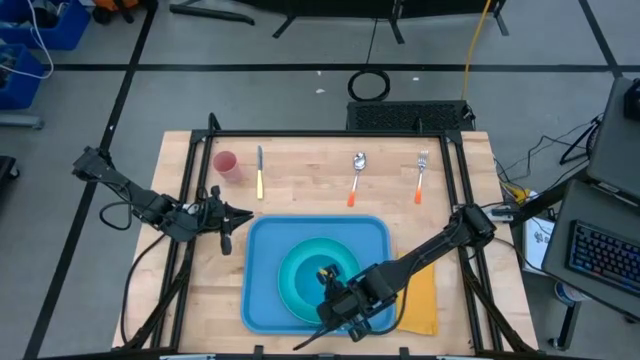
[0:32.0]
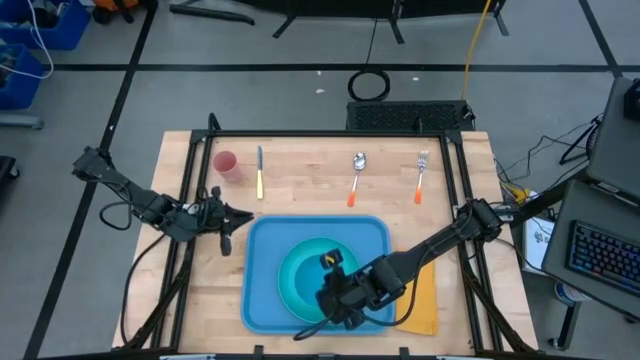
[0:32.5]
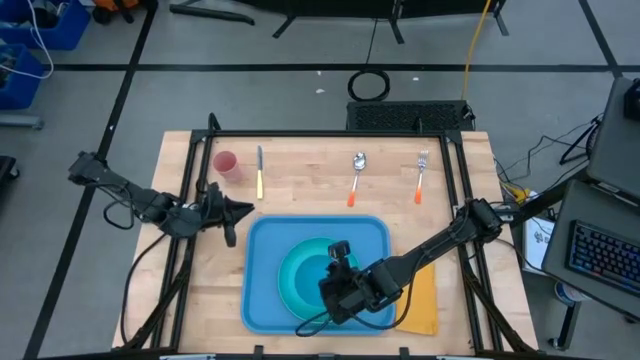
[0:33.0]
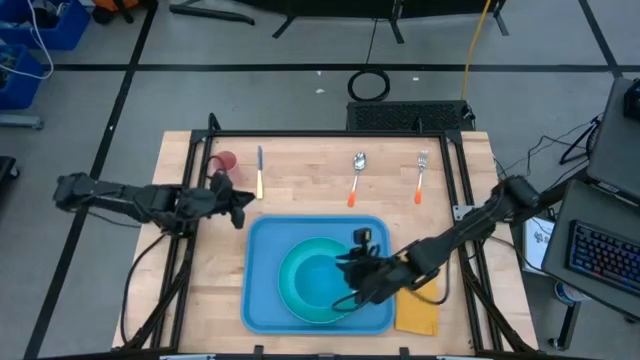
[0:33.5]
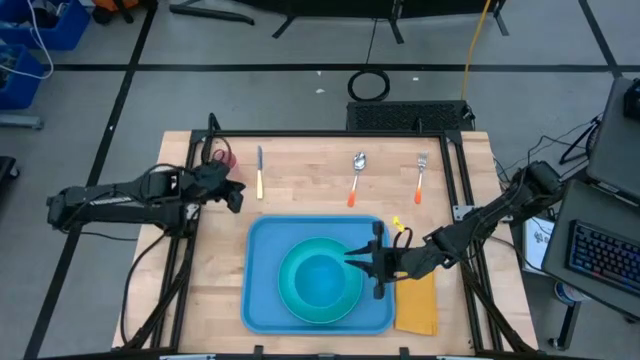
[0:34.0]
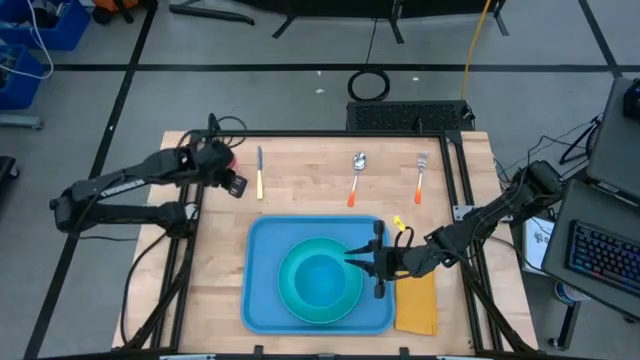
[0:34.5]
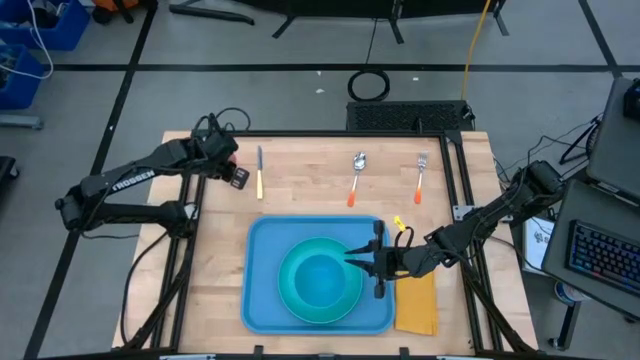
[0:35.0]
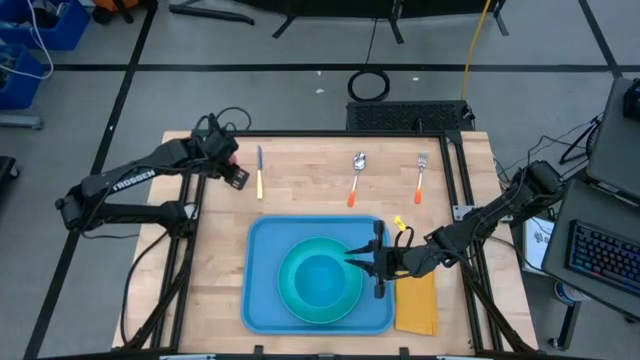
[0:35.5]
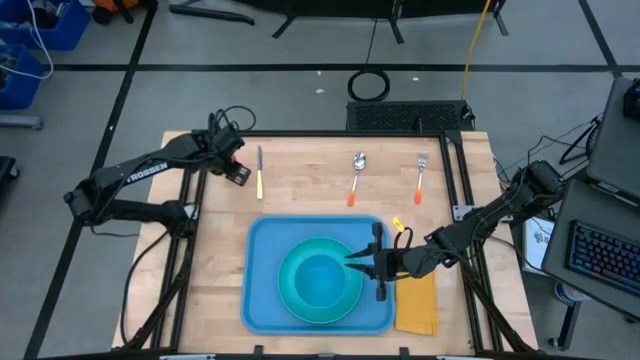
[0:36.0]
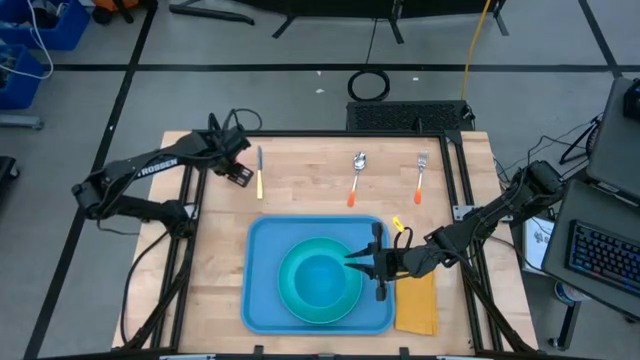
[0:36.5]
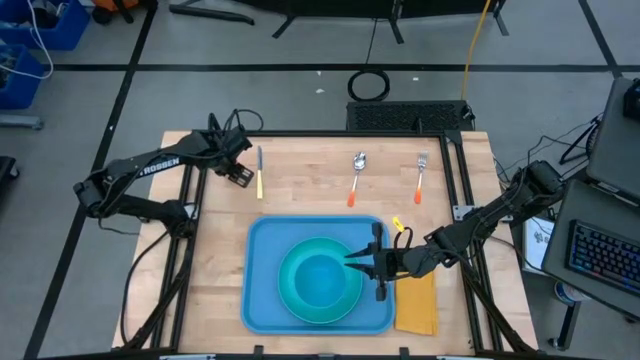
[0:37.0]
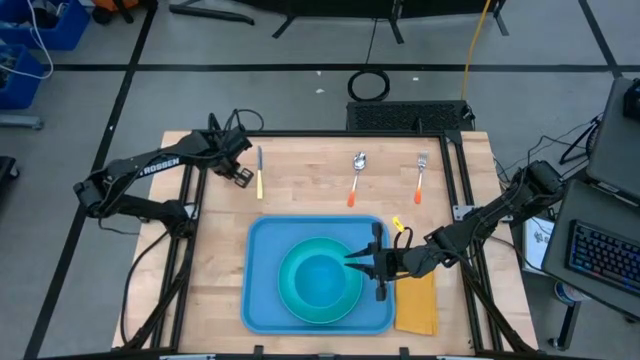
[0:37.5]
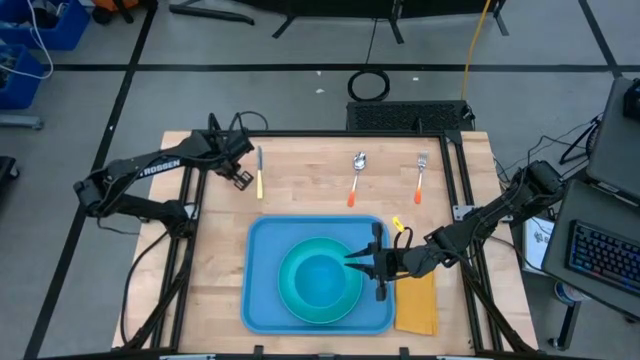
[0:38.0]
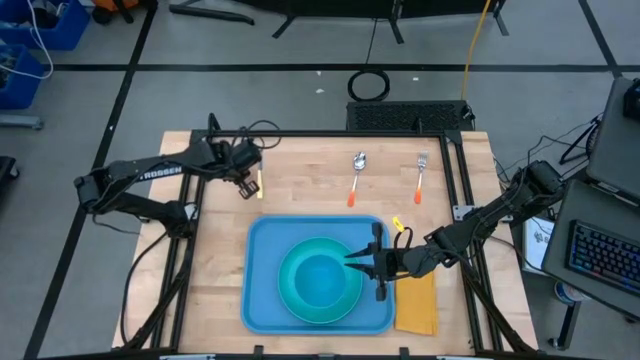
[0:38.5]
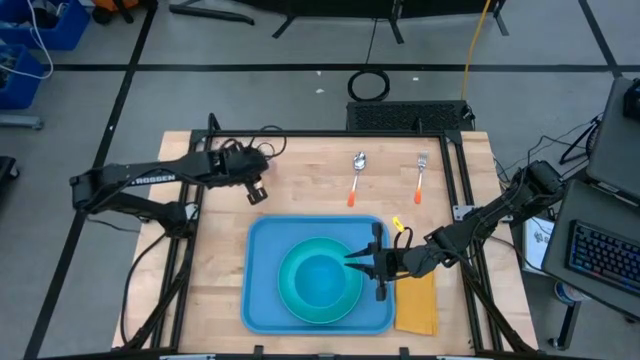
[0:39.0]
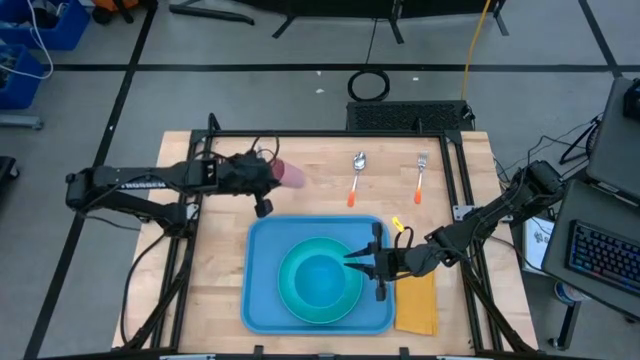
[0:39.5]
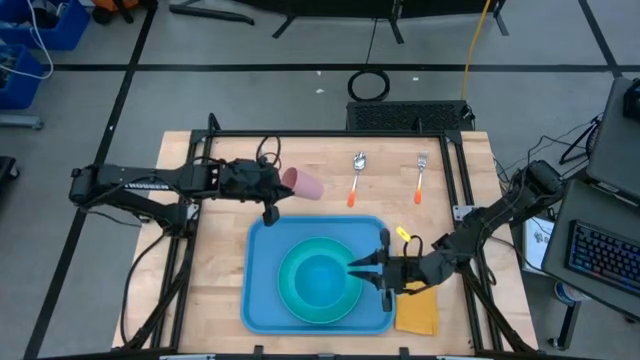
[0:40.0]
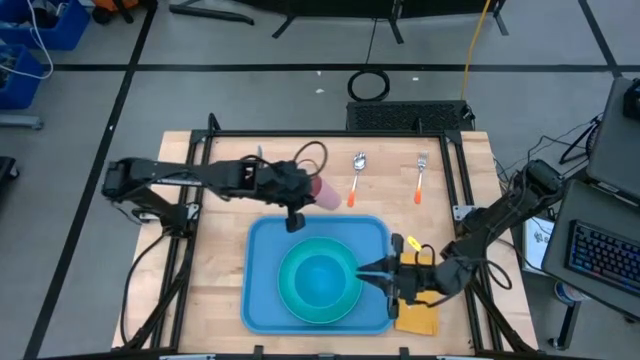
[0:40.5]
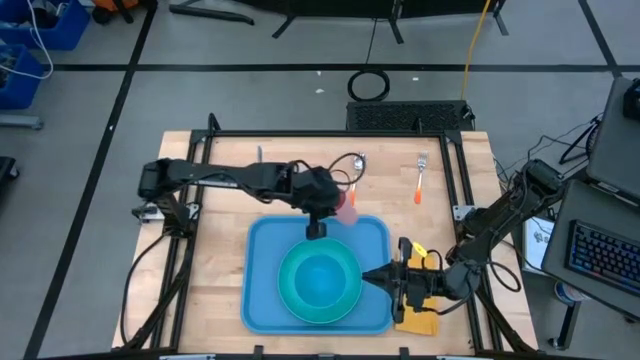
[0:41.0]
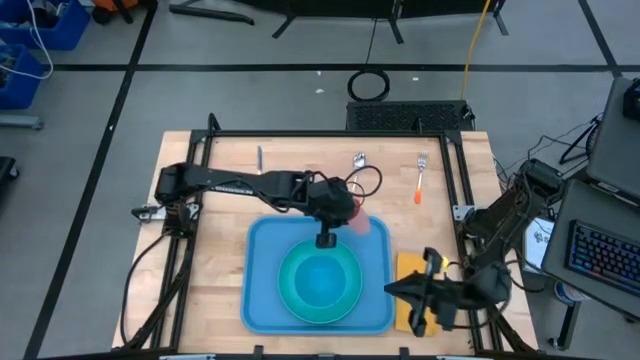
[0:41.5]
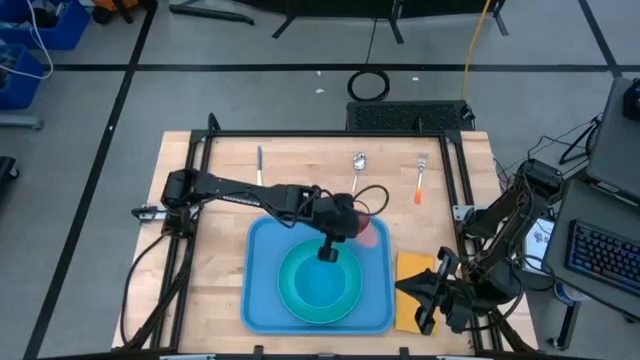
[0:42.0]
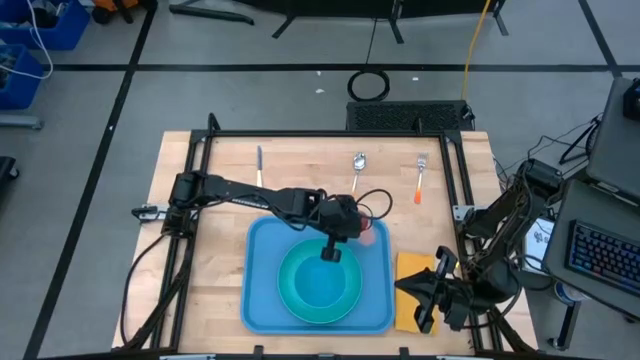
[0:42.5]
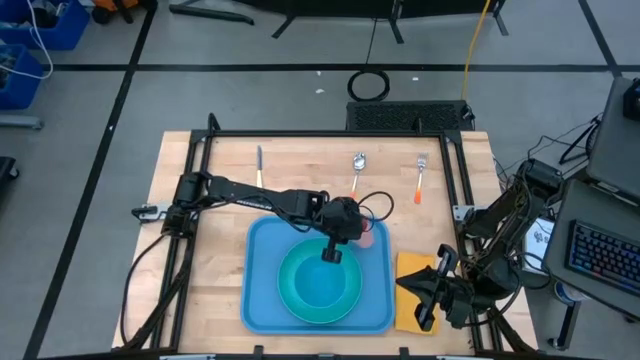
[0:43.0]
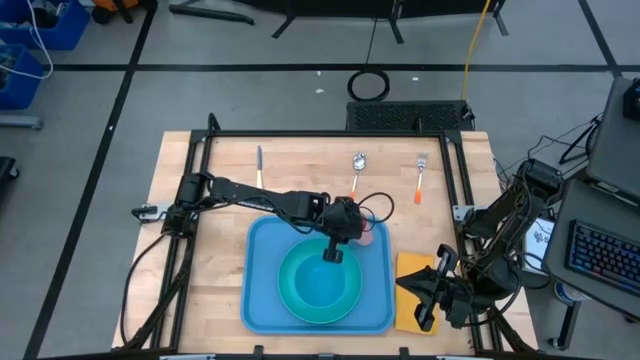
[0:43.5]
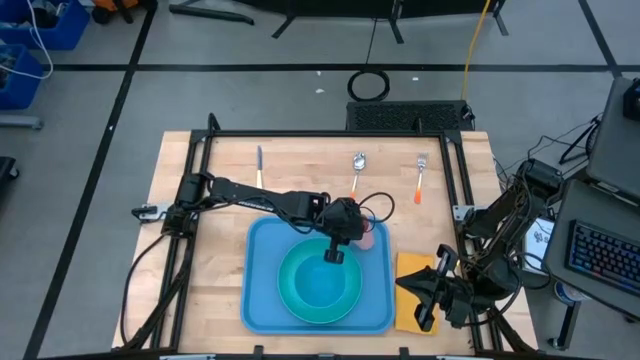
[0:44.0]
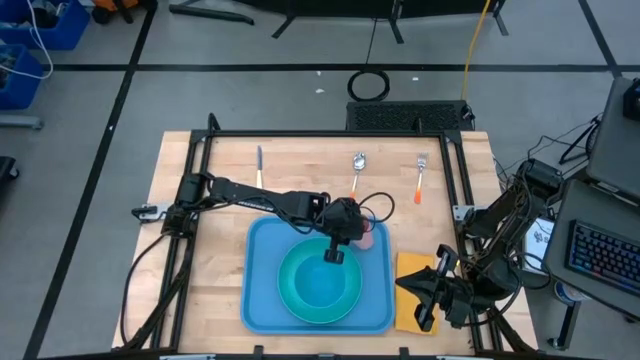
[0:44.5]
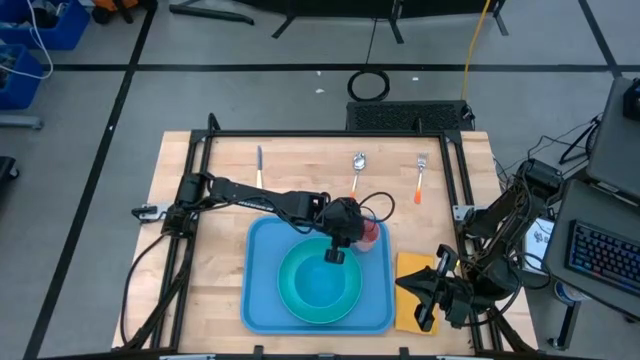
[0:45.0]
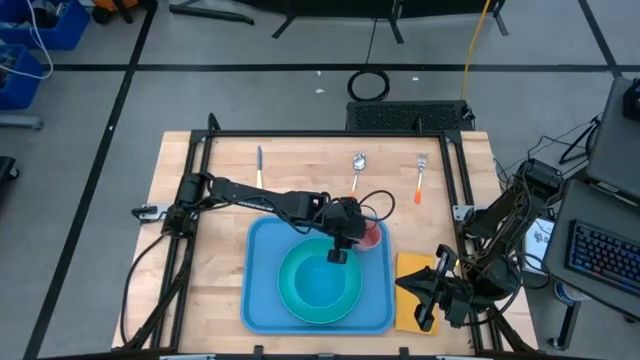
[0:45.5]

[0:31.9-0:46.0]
Task: Set up tray
Put the pink cup on the blue tray at the top right of the light blue plate

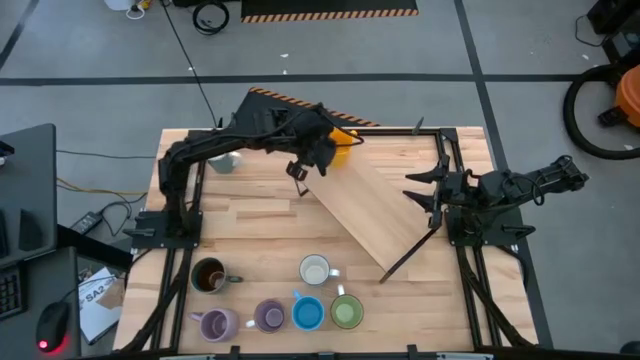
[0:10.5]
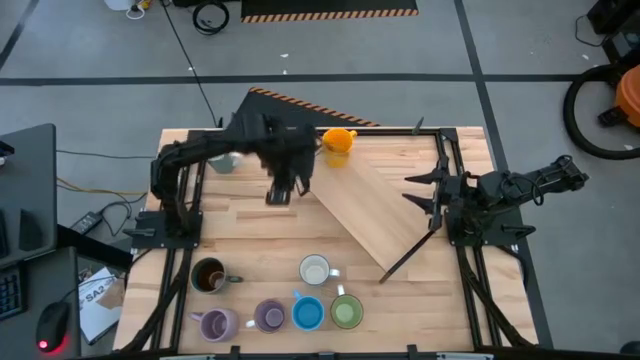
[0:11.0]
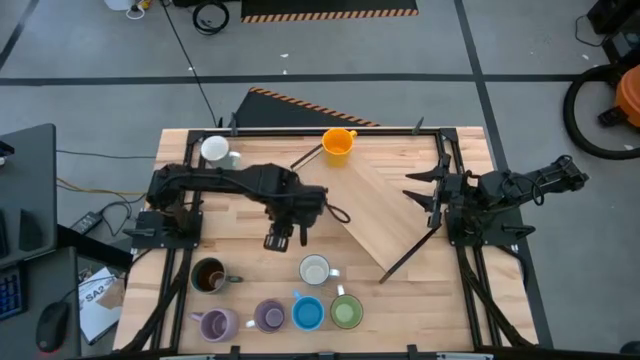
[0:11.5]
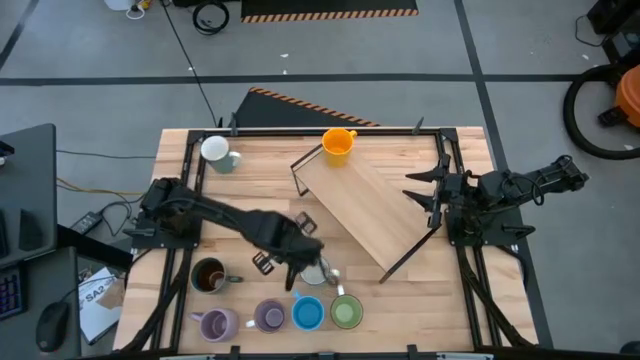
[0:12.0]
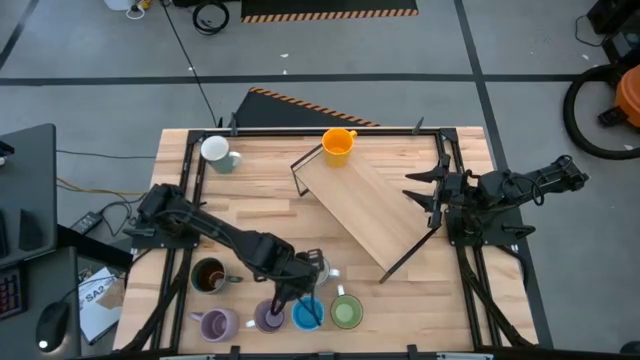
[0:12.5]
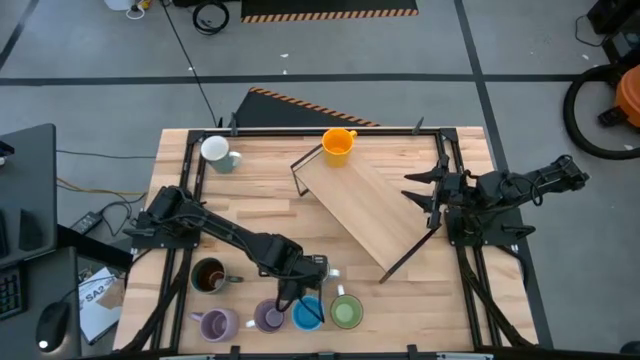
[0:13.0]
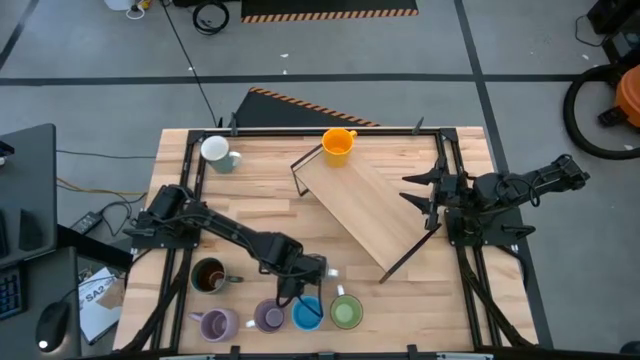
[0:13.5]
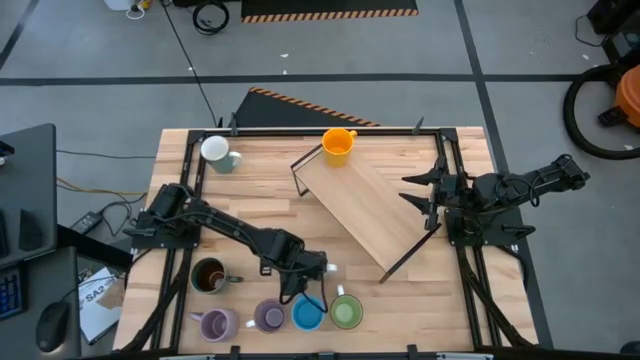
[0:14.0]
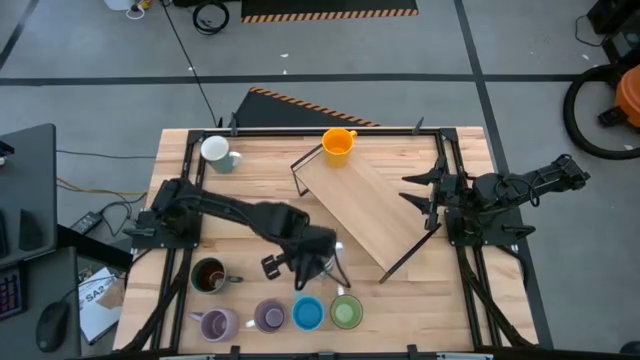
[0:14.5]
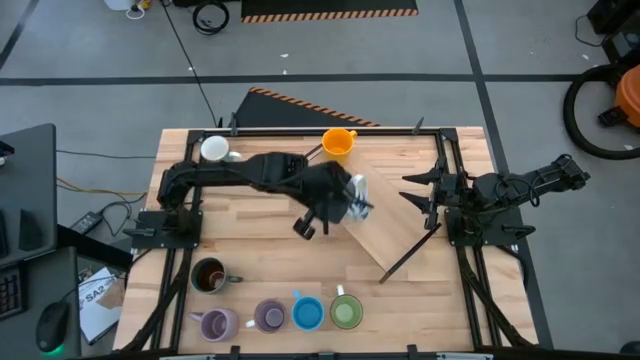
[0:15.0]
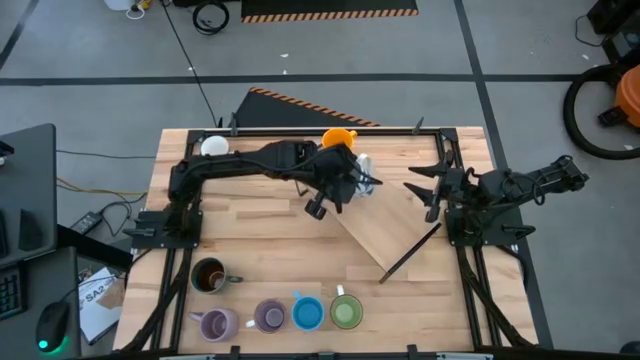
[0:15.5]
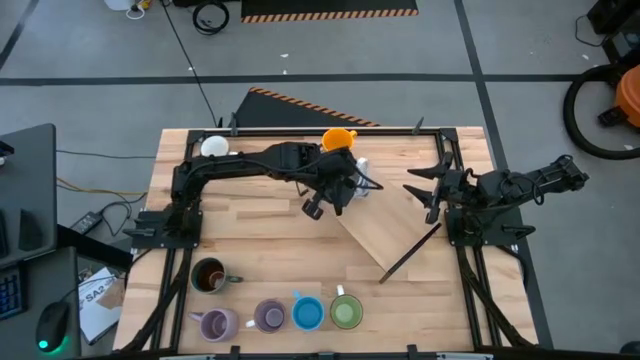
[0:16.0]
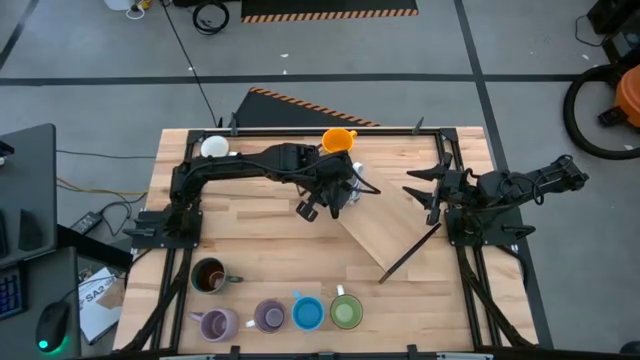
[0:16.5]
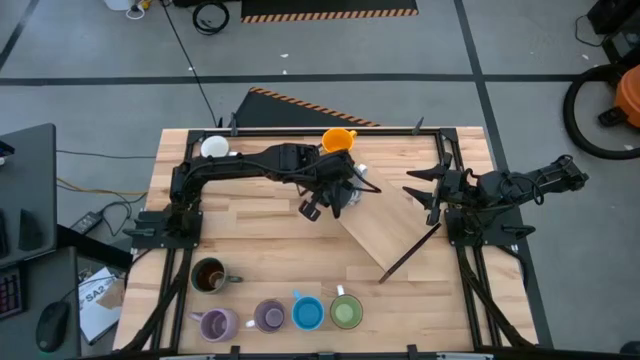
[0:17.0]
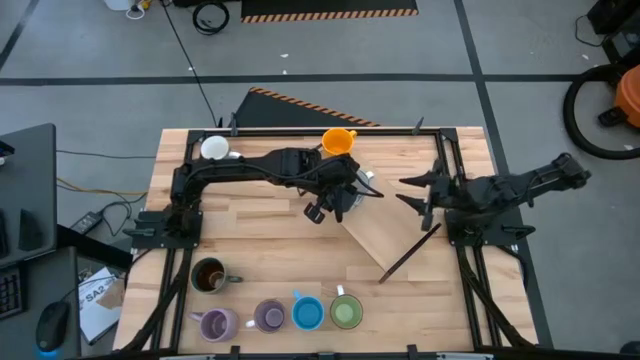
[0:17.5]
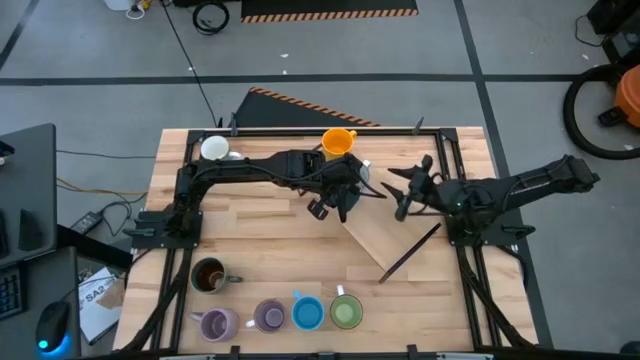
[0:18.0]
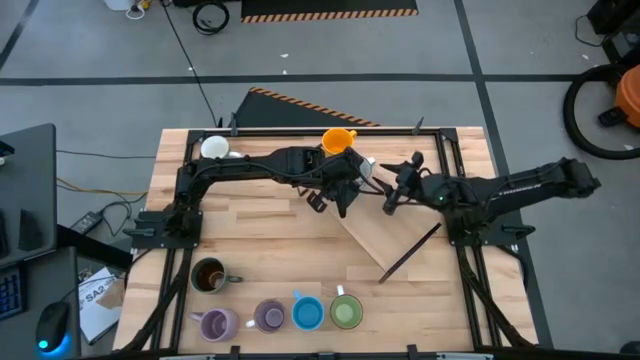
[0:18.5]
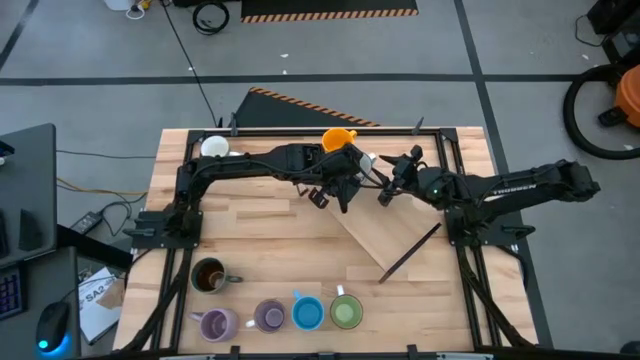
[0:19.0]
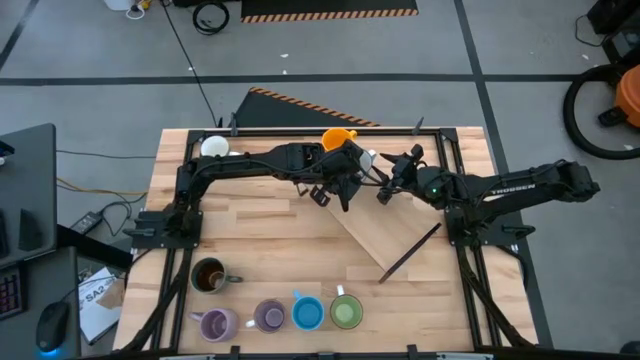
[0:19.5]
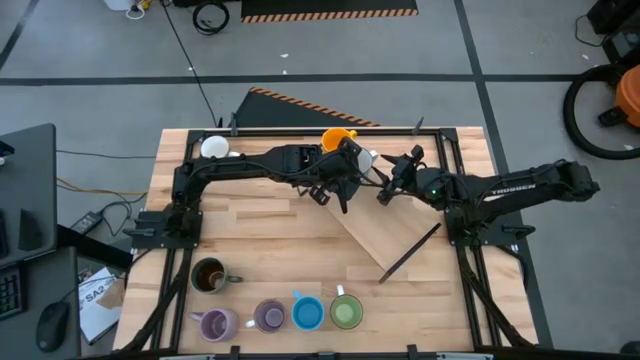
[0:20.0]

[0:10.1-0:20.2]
Task: Place coffee mugs
Put the blue patterned mug on the shelf
